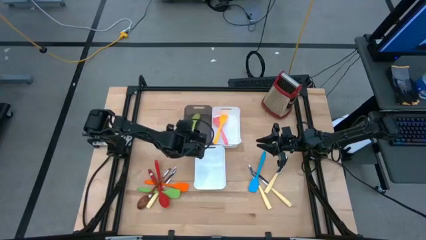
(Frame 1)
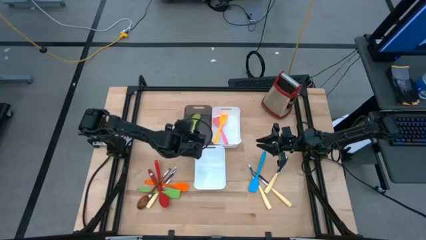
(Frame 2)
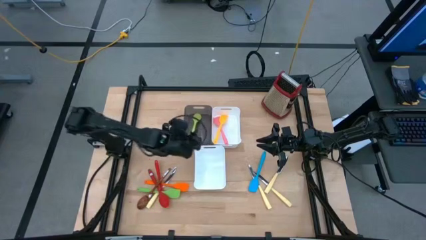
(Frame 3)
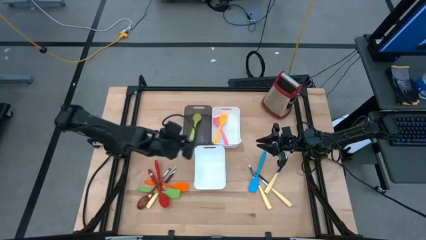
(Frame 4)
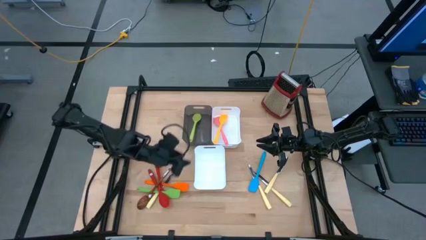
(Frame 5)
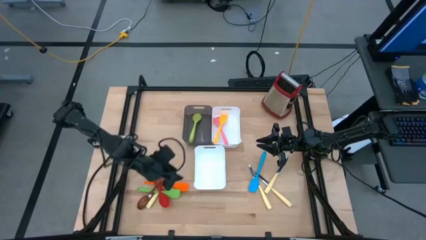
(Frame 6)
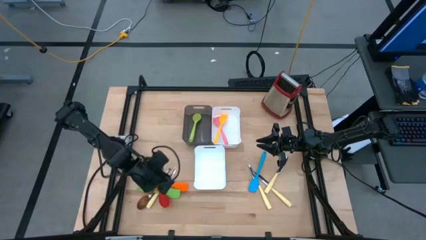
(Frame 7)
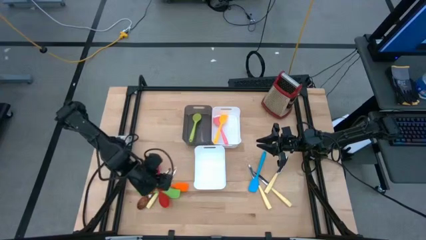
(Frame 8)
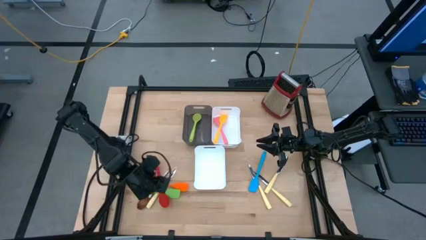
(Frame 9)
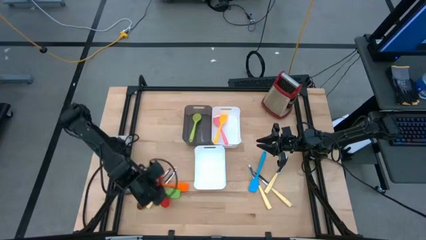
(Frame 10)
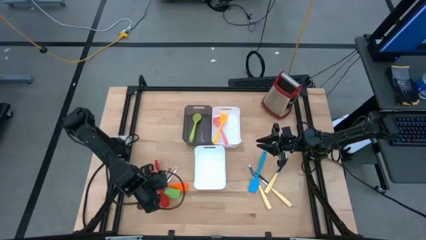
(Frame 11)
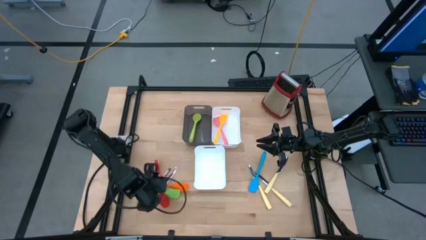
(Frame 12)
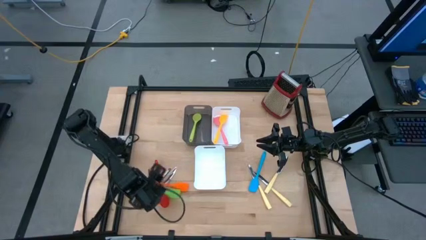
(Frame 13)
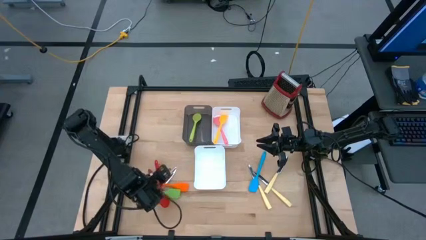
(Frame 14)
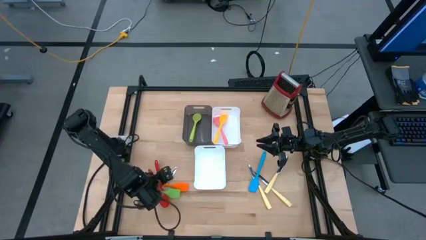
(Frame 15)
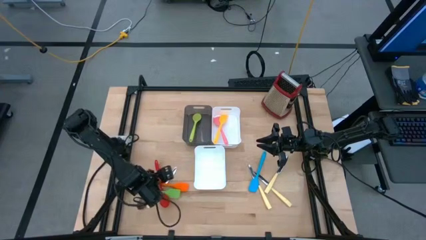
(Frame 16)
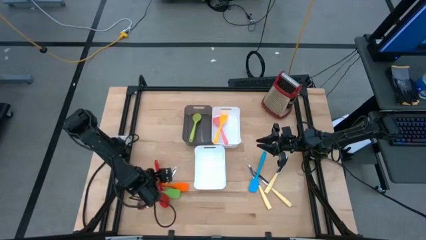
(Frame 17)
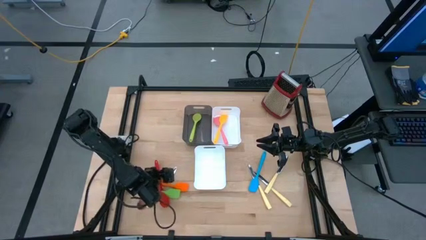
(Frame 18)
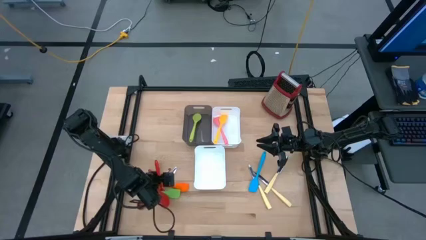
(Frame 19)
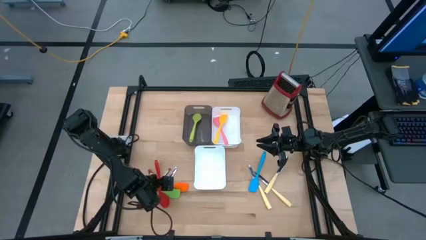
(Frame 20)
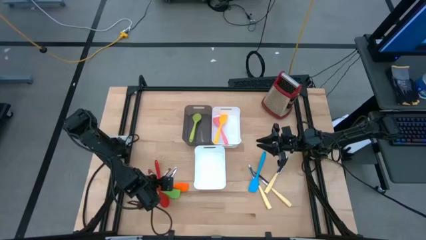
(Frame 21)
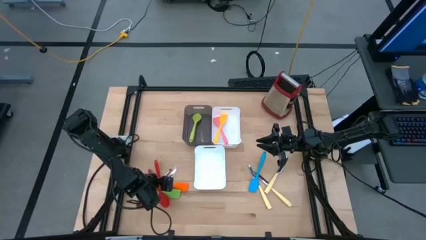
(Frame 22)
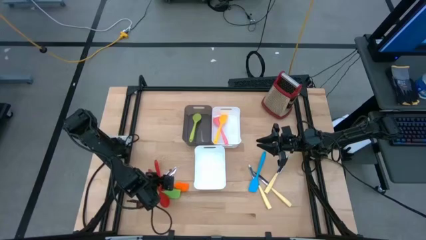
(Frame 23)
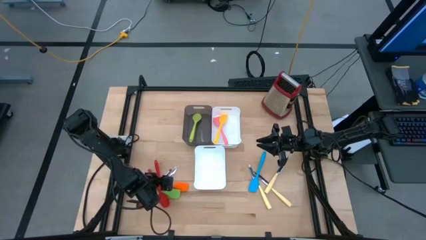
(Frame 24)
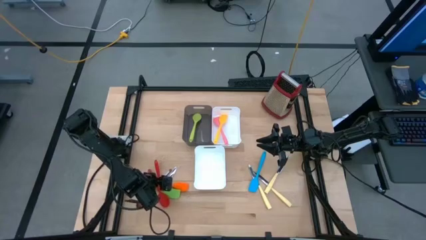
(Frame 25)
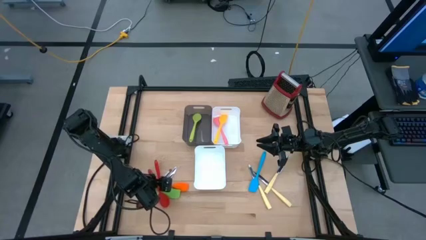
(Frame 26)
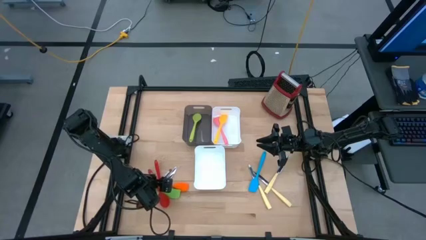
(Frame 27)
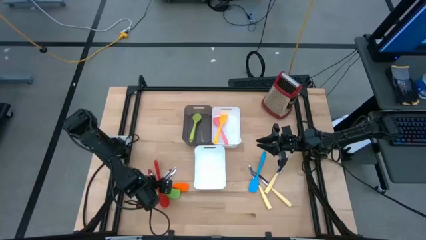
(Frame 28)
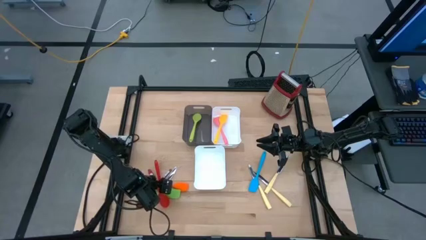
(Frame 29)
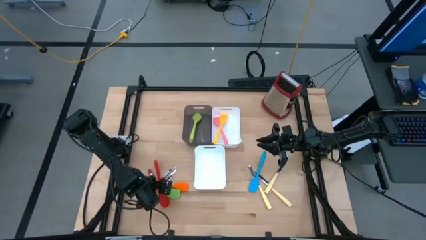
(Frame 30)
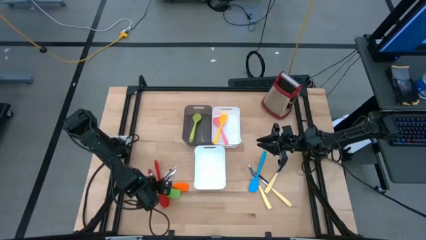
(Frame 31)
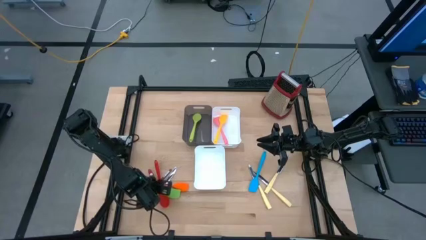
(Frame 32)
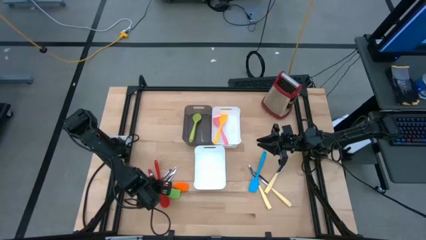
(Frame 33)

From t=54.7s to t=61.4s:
Task: Pick & Place Kitchen Items
Put the wooden serving spoon into the black bin

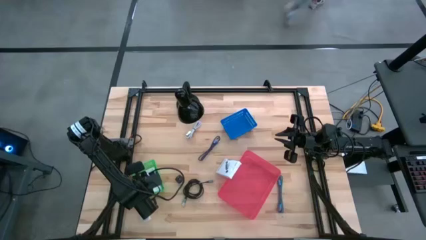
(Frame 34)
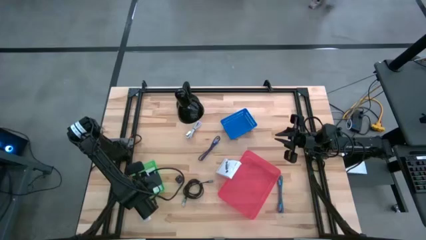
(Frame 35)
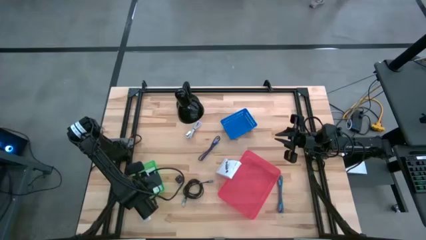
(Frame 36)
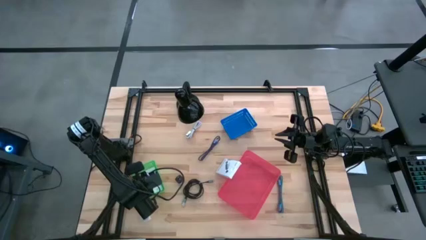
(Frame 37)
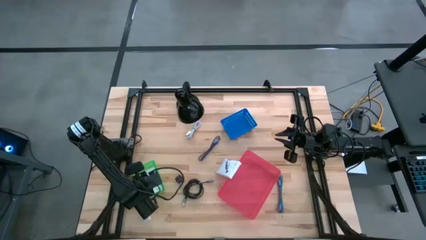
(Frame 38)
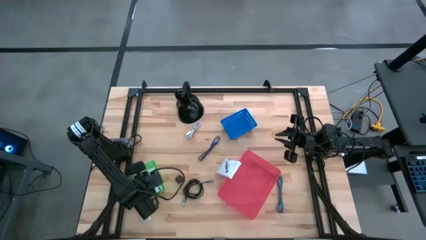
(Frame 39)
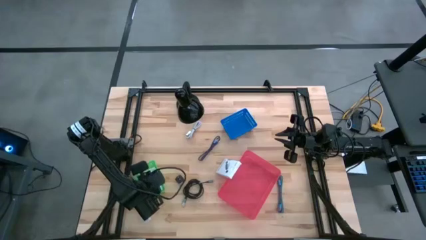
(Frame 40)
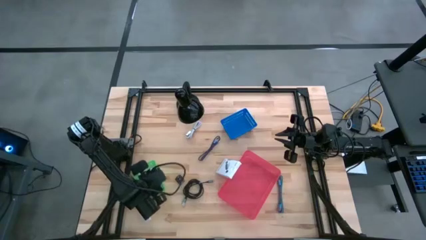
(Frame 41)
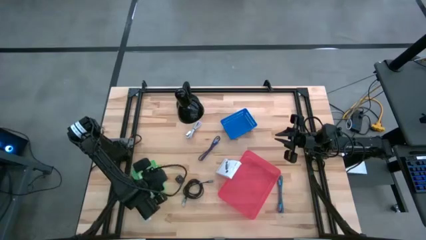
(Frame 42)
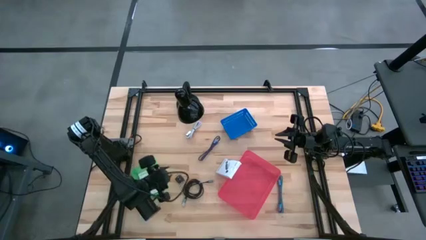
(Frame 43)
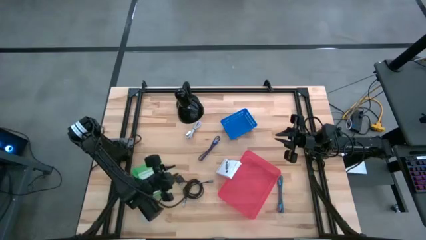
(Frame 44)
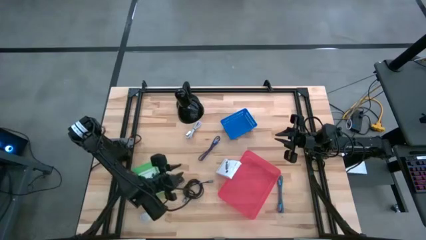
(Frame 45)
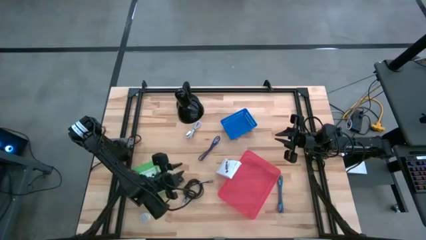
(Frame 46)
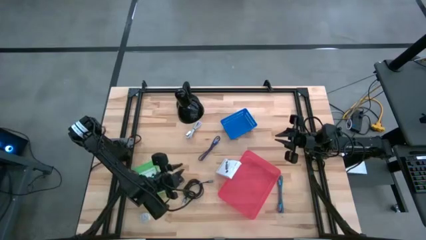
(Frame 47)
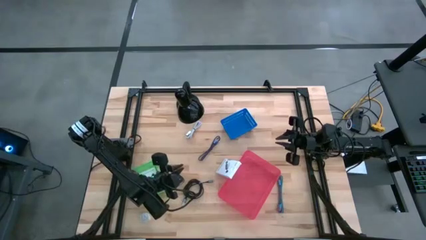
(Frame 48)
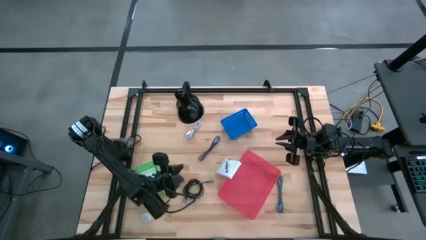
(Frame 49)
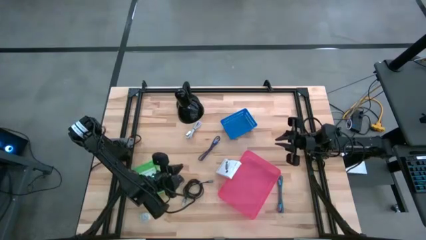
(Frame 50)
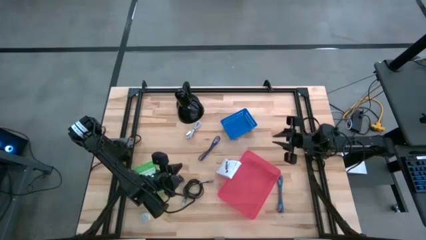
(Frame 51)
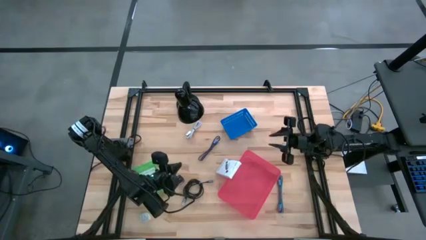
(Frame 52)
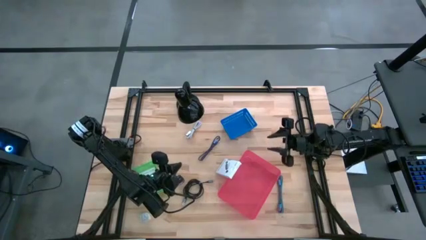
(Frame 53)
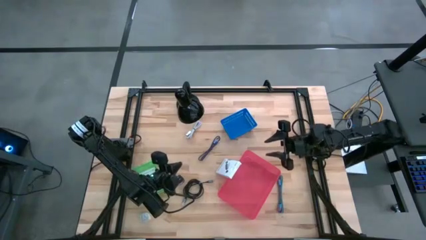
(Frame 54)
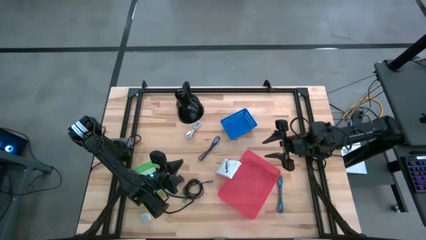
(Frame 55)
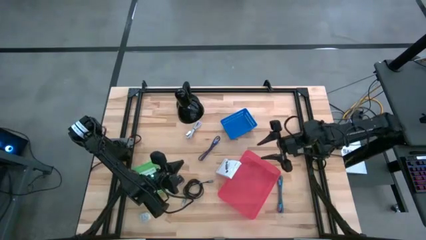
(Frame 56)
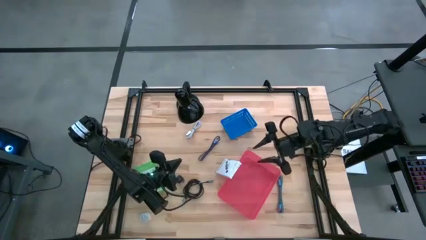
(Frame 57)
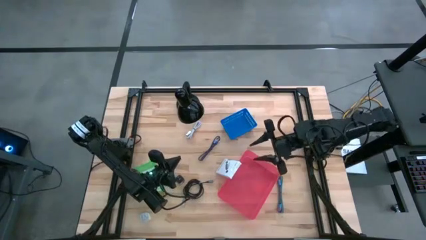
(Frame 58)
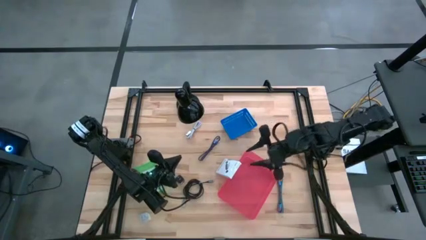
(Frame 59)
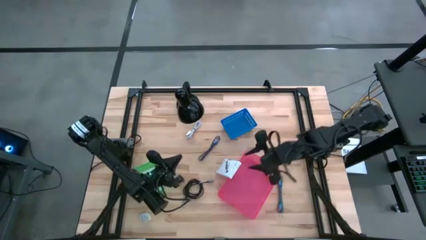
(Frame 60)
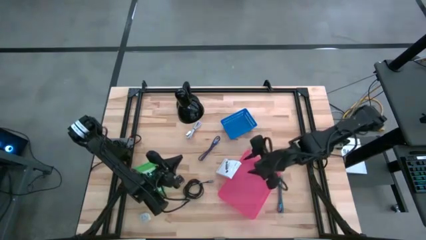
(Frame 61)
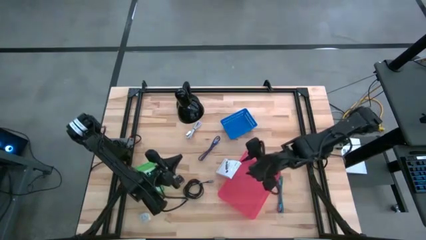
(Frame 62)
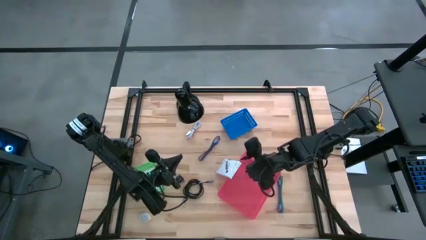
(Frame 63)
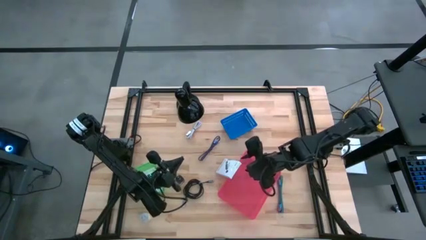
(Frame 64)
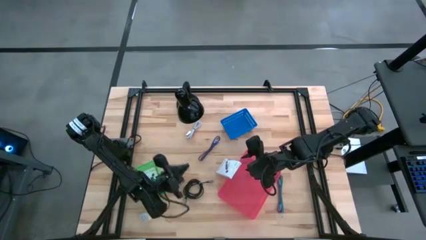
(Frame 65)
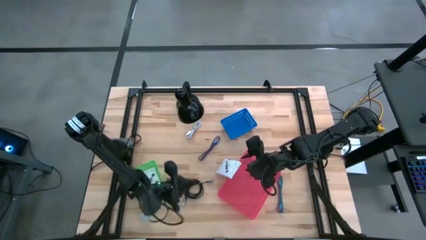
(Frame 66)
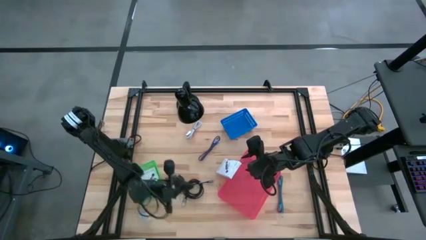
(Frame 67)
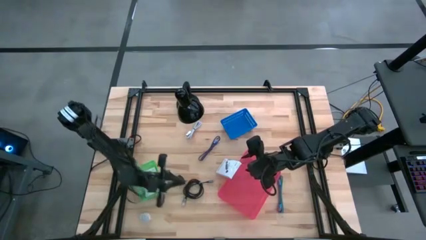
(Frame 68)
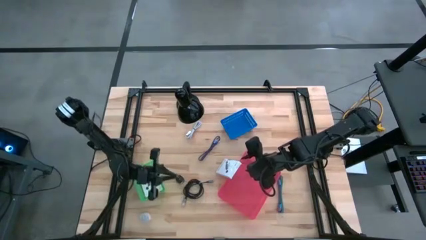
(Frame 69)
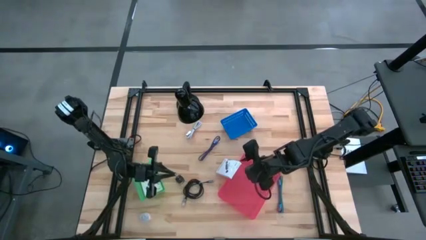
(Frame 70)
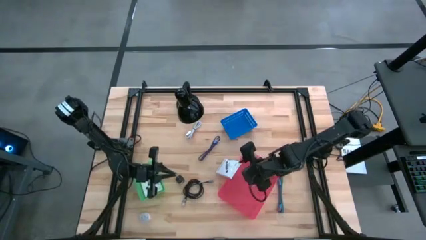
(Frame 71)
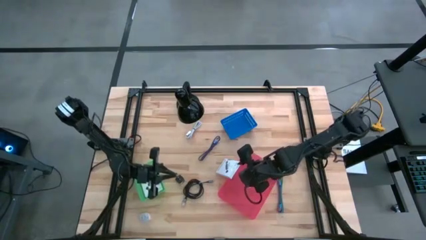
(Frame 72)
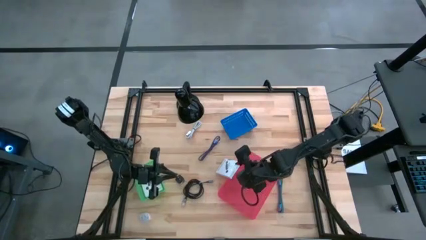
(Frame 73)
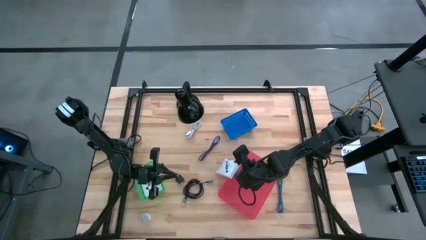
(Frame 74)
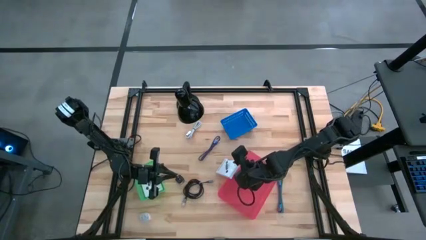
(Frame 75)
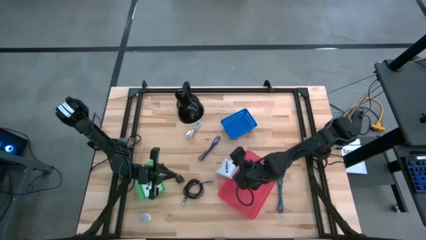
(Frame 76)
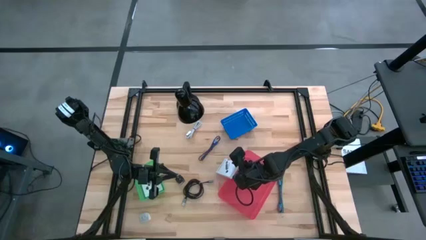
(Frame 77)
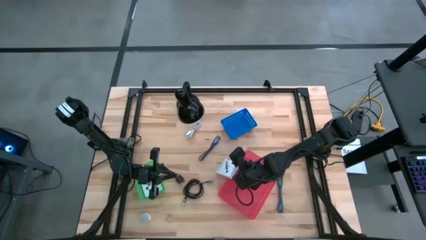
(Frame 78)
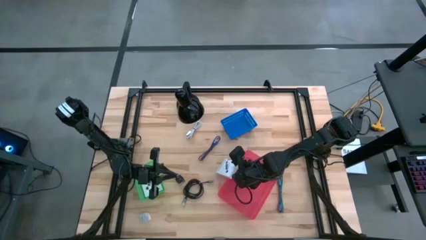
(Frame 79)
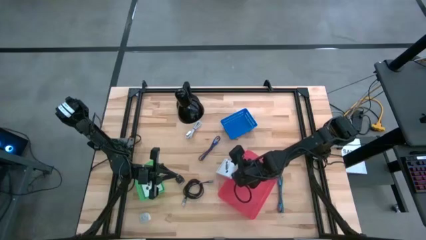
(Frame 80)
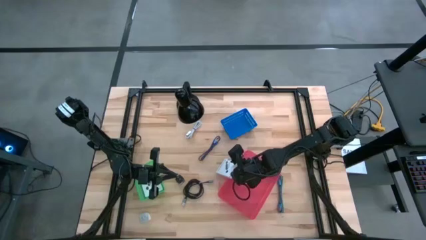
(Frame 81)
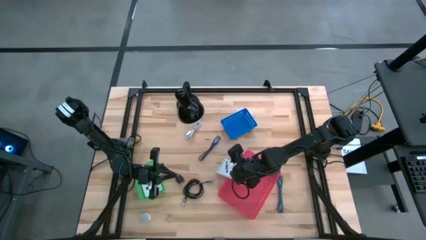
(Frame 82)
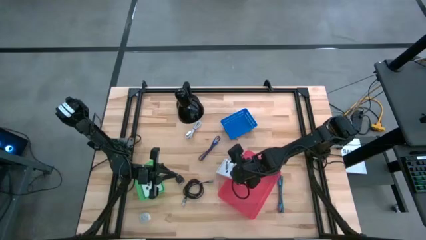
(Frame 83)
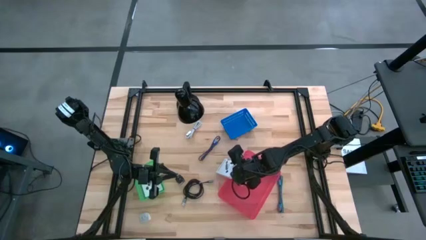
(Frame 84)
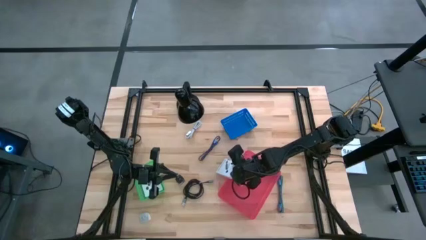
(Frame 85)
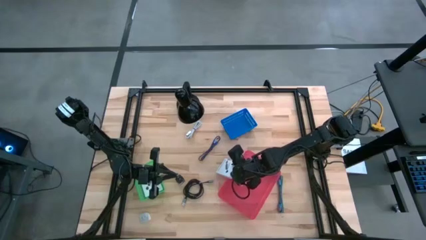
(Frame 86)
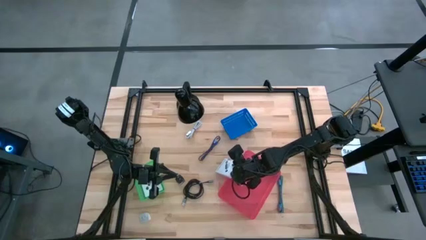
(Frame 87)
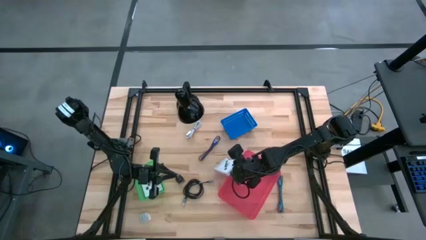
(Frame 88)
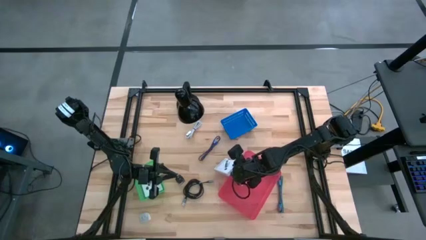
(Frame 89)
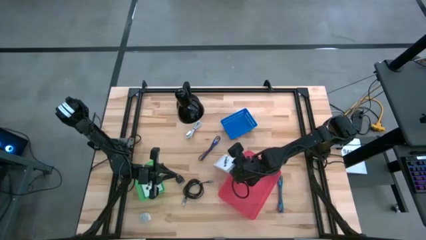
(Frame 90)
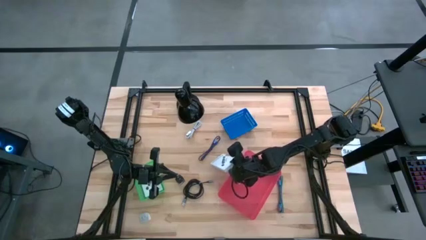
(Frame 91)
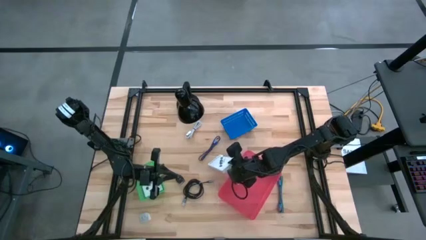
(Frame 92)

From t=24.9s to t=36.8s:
Task: Pick and place items into bin
Put the white card reader box into the green bin
